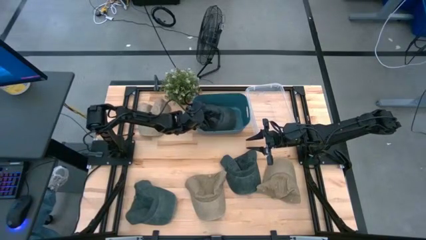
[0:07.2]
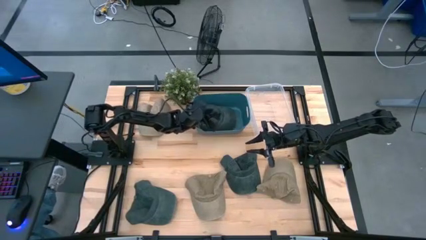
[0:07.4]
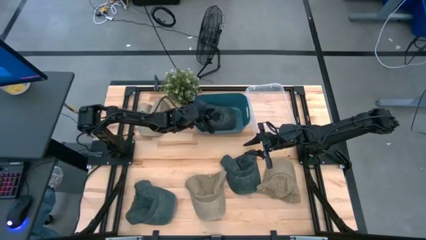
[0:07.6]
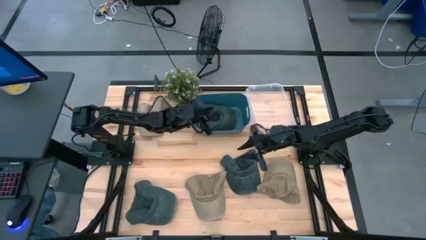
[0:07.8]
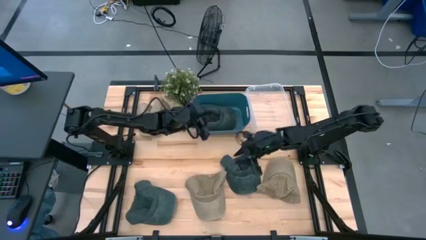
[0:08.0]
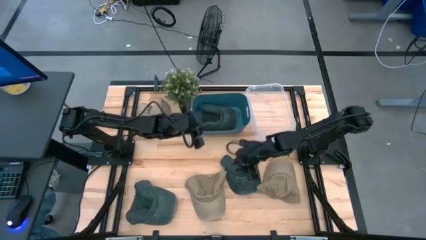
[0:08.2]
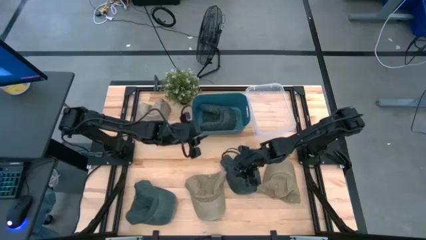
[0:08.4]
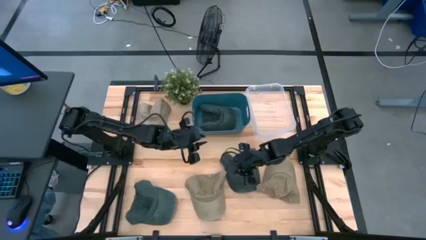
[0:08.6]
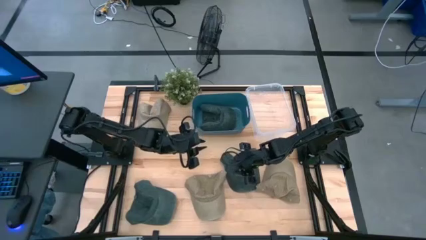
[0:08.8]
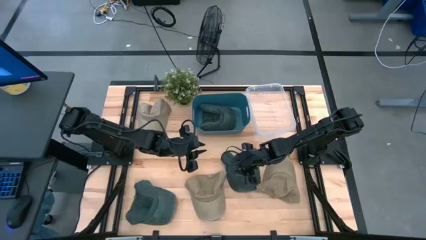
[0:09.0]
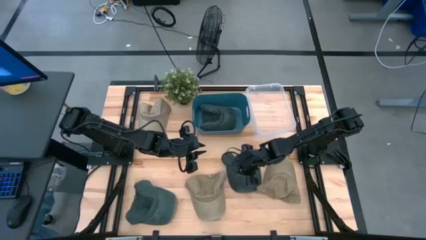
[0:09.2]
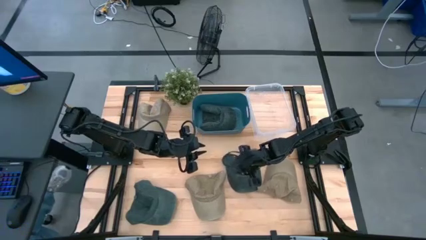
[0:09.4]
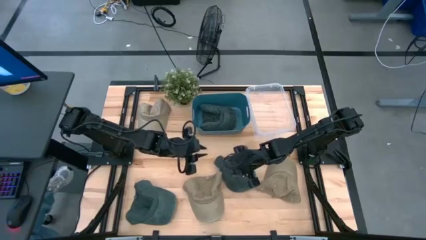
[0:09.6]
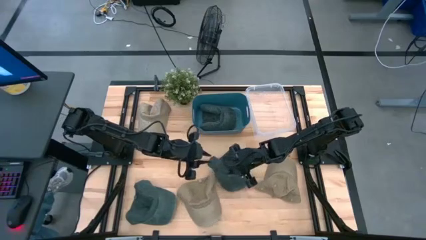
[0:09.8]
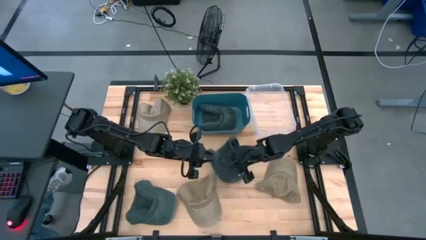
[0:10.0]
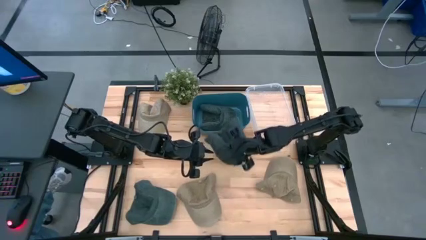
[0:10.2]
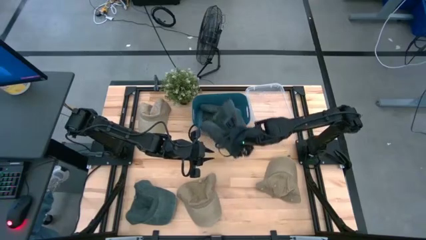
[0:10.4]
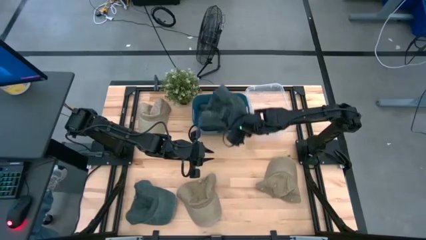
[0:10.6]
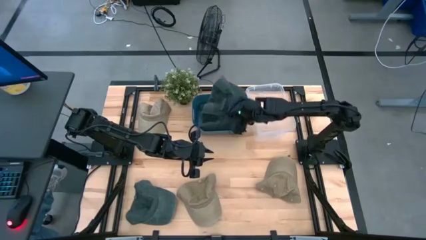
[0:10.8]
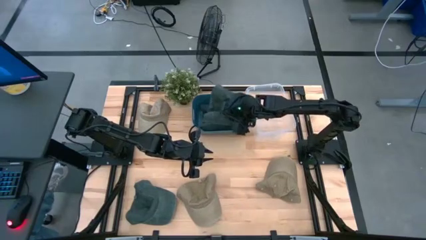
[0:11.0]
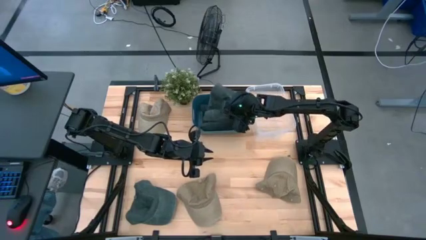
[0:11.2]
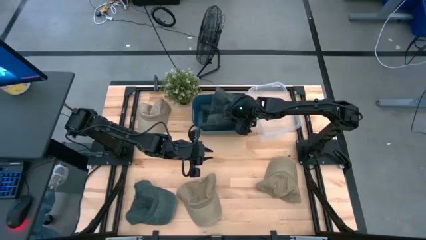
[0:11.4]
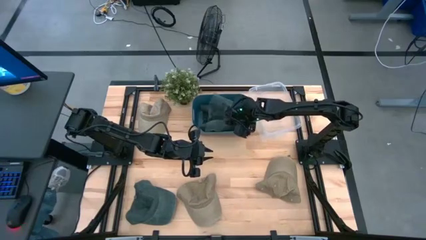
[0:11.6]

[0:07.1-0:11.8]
Task: Pick & Place hat
Put the right dark blue cap into the blue bin

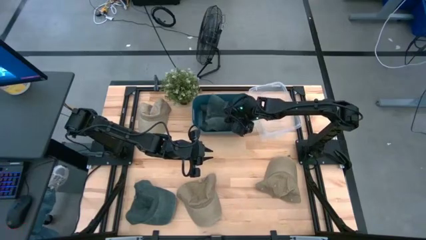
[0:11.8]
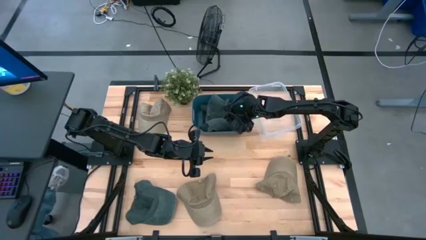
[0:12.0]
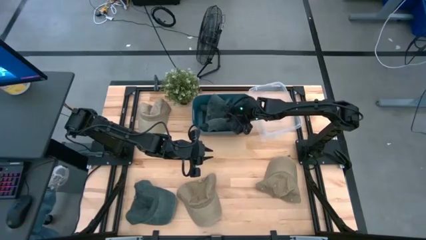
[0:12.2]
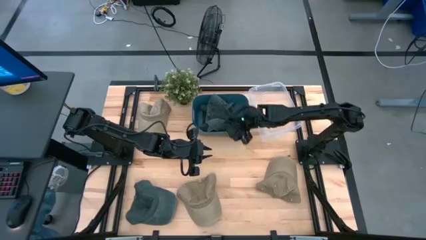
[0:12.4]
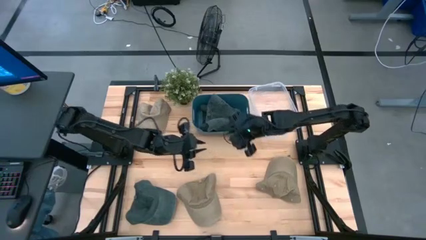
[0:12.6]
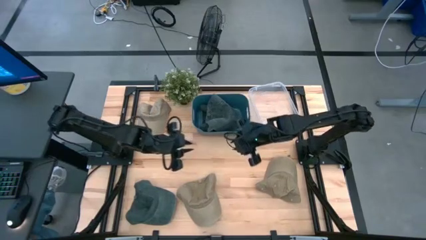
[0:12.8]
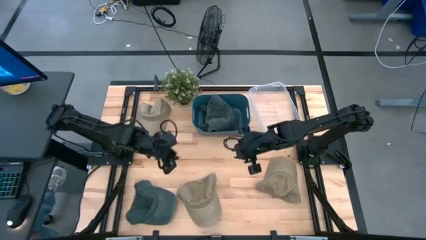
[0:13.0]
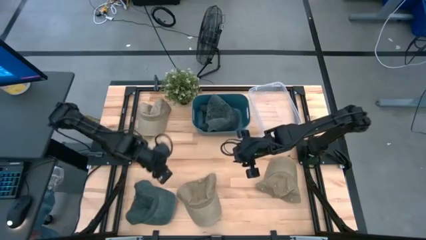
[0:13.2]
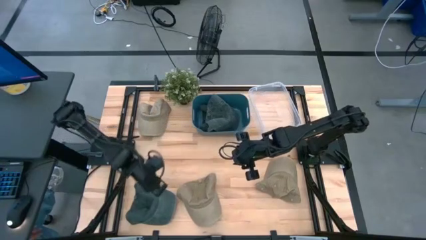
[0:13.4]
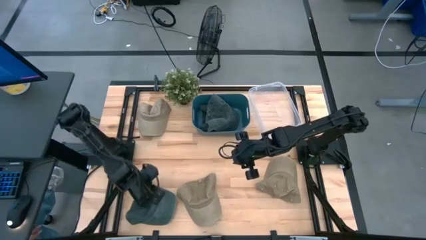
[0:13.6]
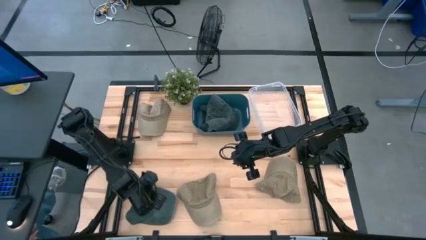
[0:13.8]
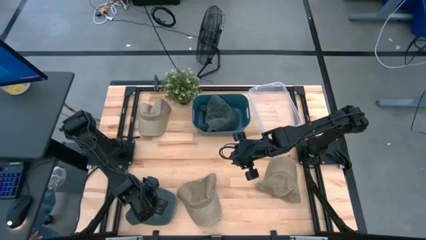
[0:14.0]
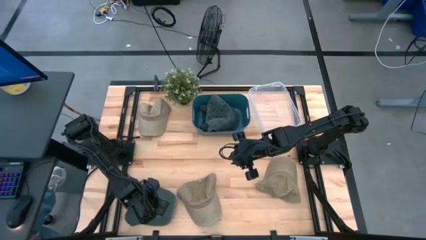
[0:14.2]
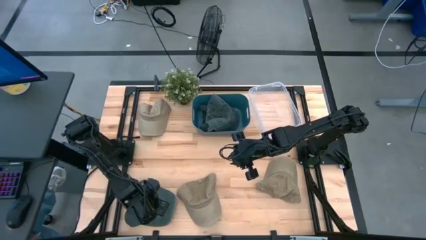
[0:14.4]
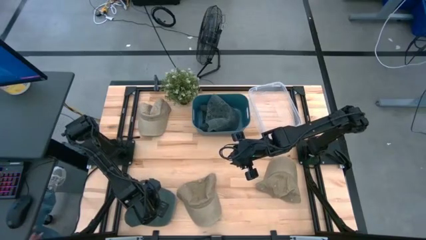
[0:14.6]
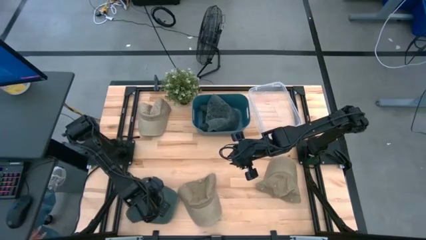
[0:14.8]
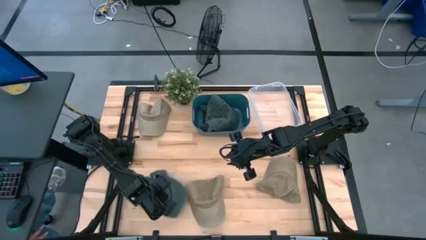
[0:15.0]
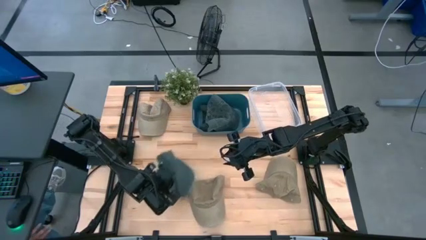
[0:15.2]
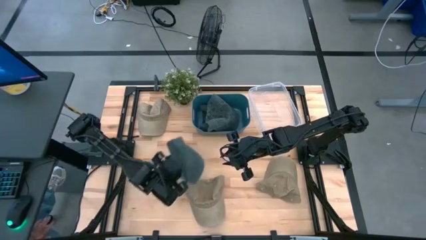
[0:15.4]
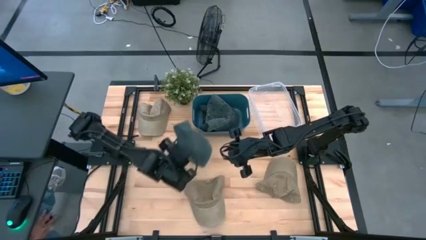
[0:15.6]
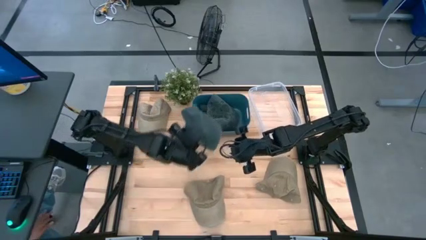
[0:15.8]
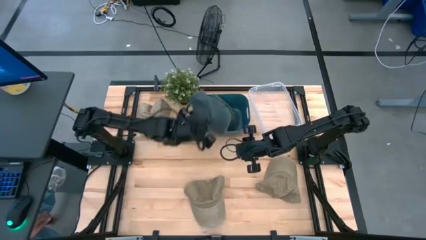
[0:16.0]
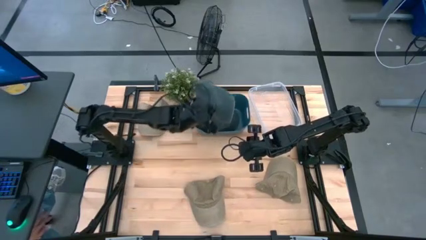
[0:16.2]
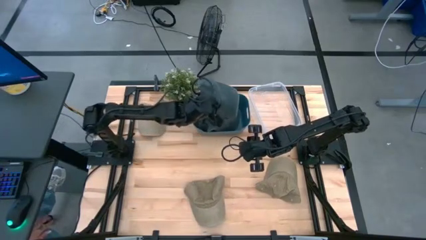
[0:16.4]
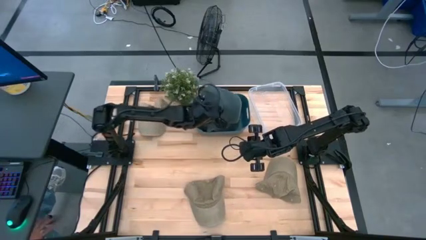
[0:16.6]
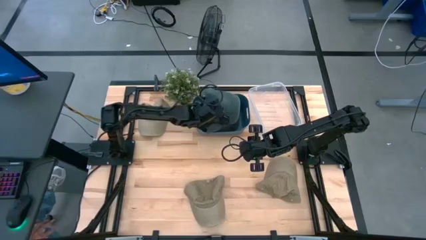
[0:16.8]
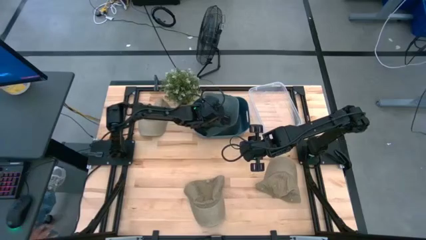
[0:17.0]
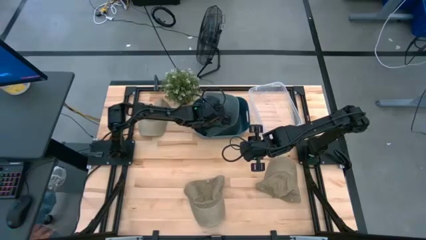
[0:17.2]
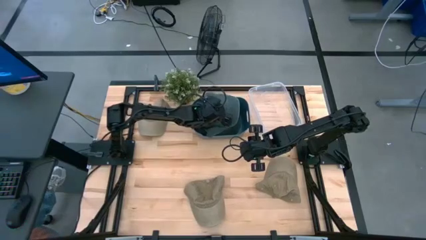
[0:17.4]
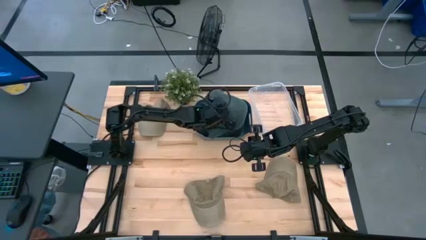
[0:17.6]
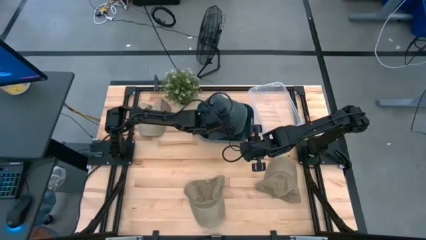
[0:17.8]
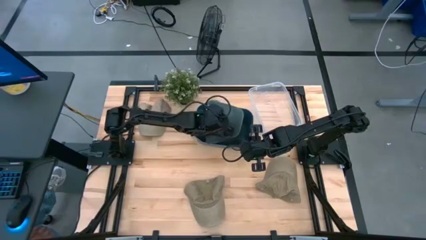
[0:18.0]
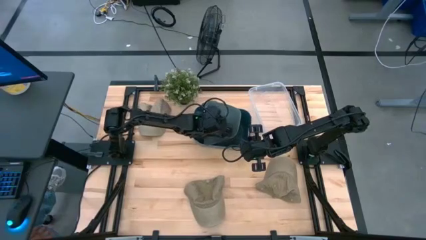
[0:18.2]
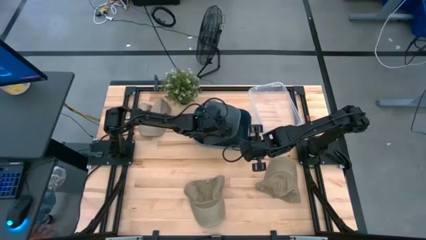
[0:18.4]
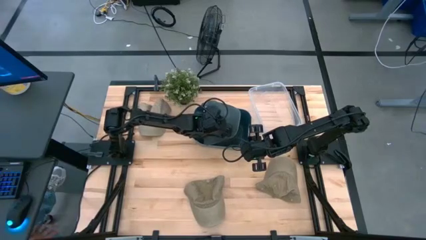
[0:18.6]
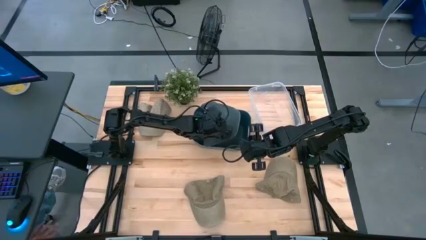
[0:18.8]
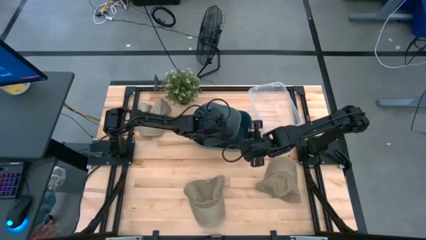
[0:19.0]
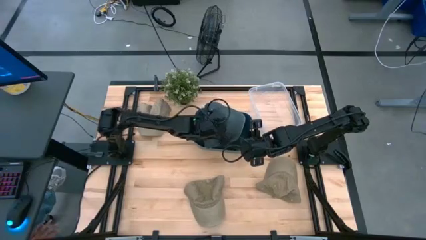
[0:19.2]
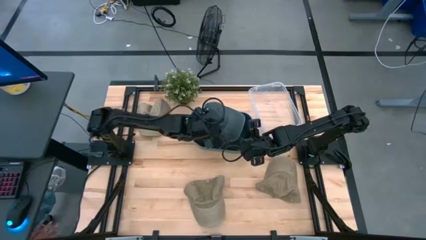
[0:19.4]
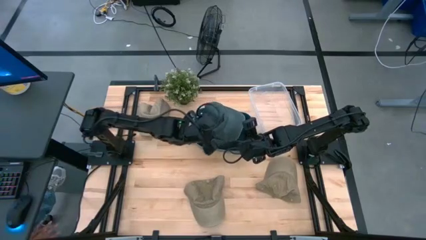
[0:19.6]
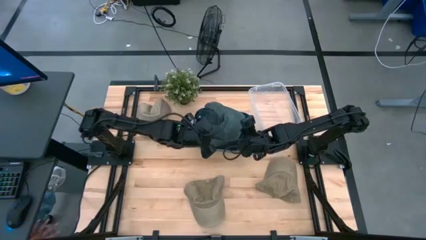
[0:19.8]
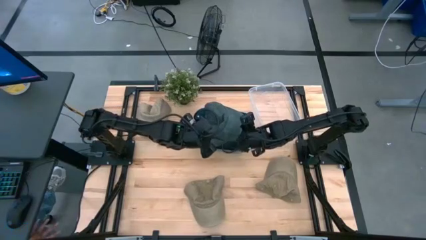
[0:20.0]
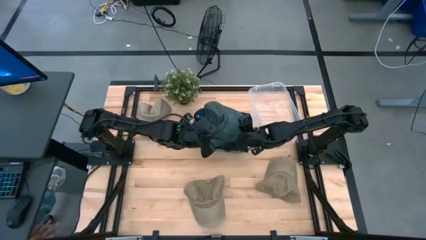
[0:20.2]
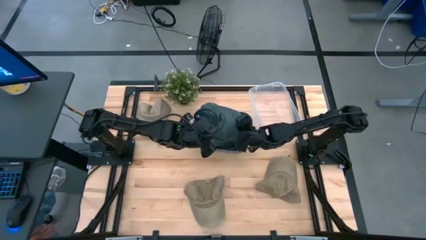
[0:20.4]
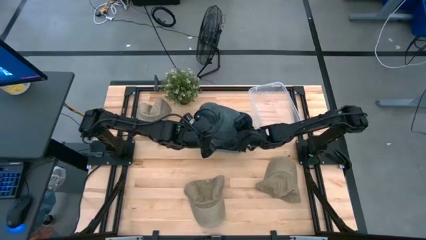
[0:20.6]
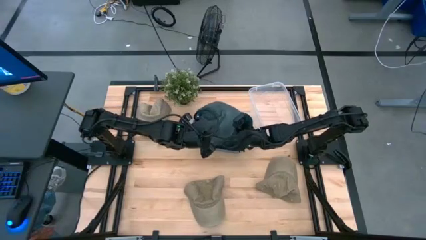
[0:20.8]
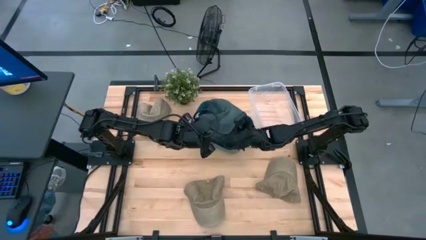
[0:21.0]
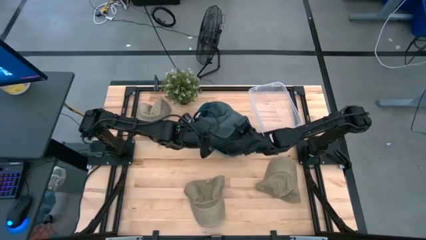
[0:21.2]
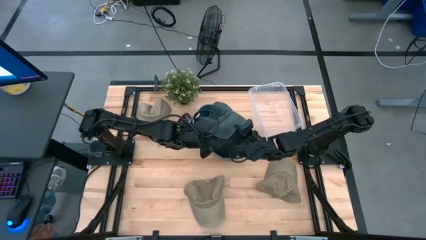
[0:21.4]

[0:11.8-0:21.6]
Put the dark blue cap into the blue bin

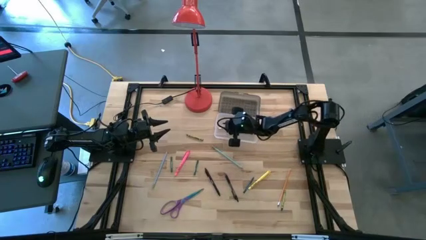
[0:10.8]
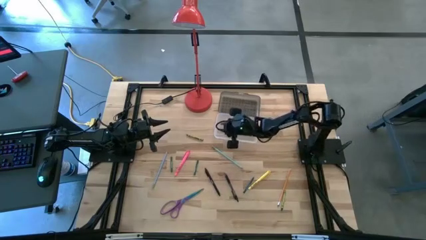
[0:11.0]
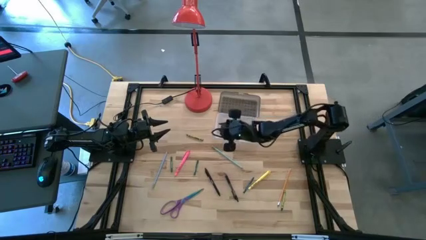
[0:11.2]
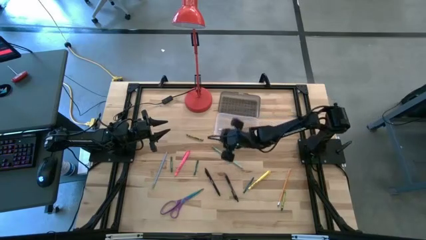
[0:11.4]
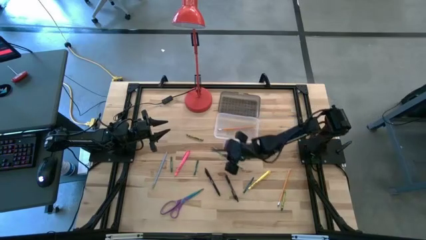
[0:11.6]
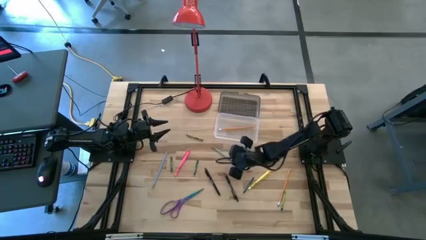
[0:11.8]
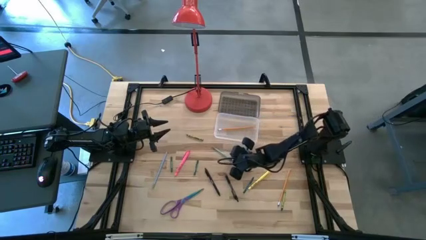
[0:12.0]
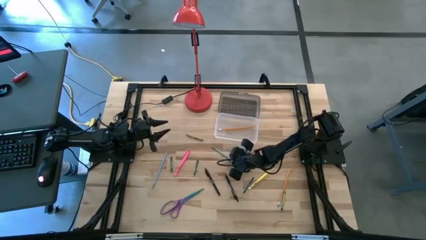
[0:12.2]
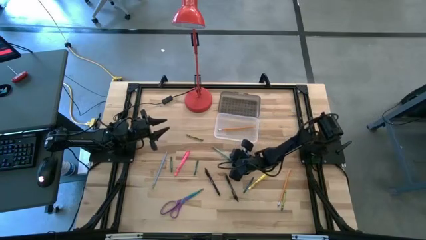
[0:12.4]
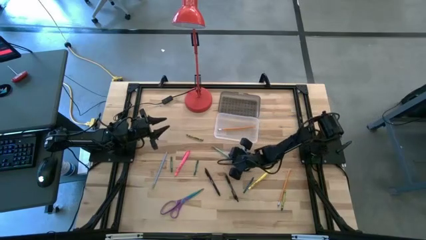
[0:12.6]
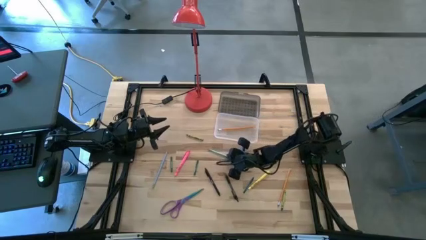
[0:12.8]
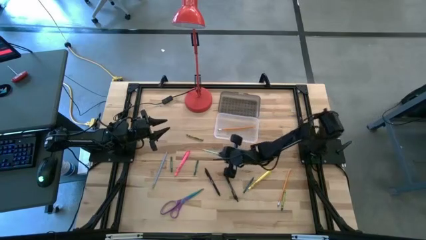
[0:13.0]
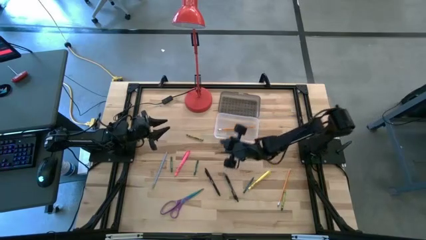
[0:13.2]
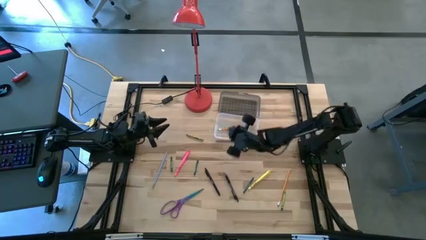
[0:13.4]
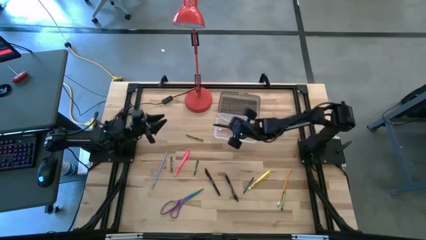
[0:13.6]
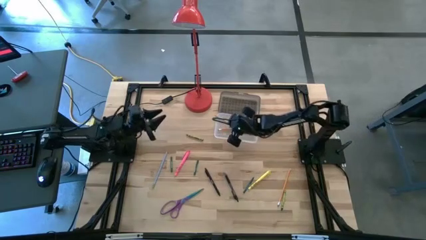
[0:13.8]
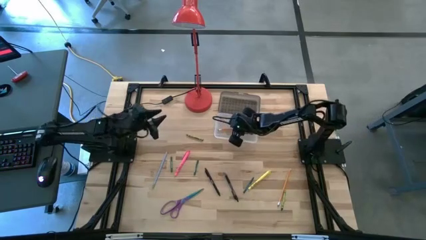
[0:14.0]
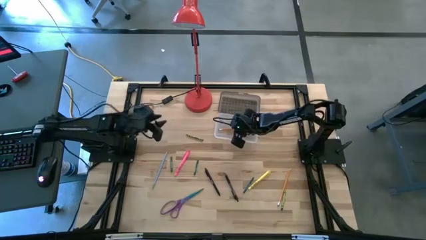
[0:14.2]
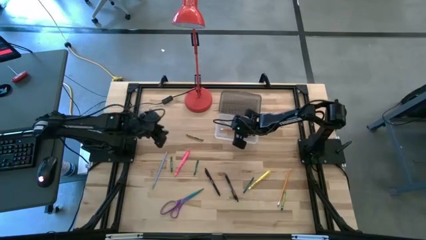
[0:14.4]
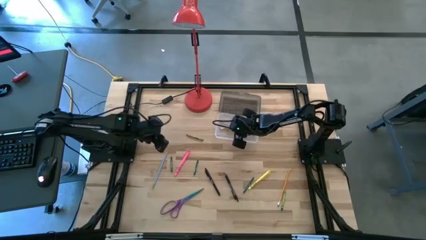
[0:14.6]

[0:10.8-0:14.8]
Task: Pick & place school supplies into a supply box
Put the light blue pencil into the black supply box
